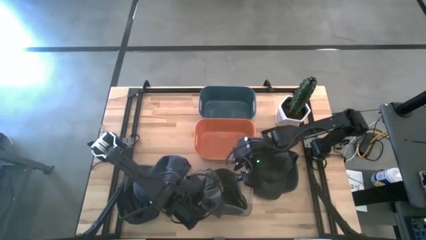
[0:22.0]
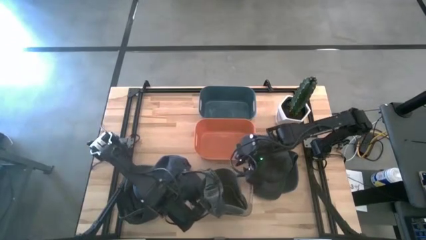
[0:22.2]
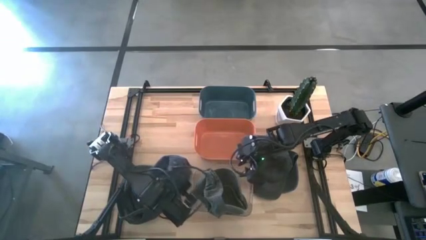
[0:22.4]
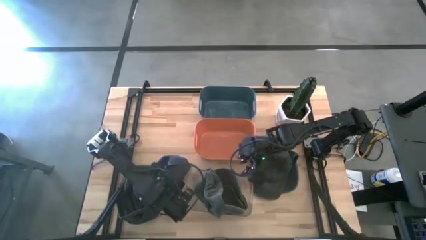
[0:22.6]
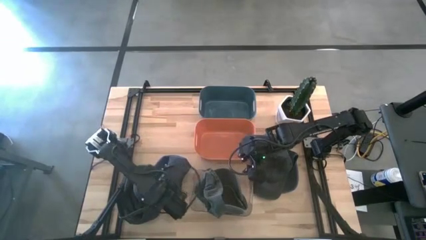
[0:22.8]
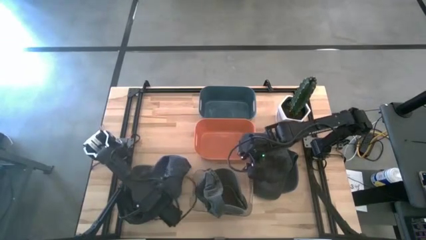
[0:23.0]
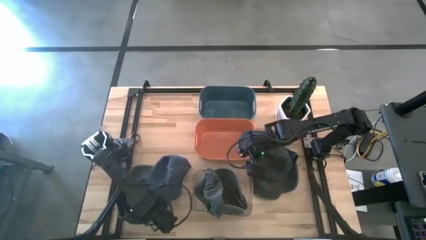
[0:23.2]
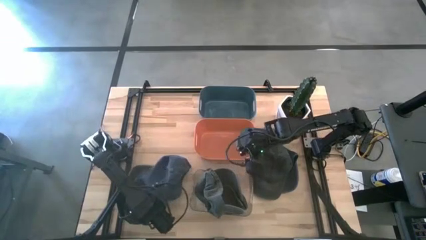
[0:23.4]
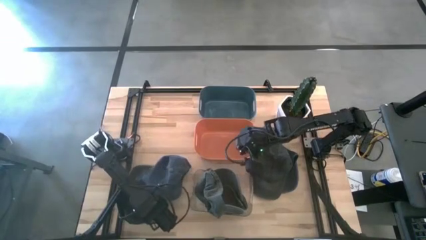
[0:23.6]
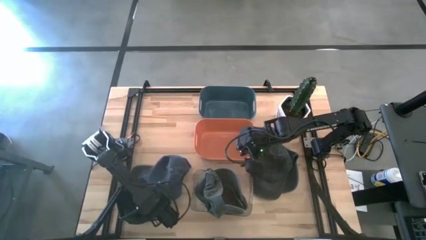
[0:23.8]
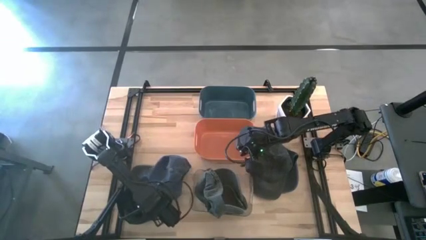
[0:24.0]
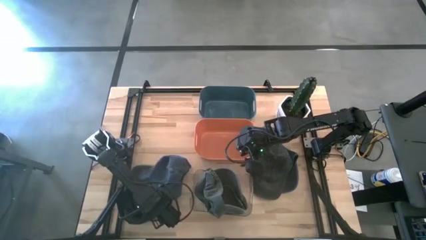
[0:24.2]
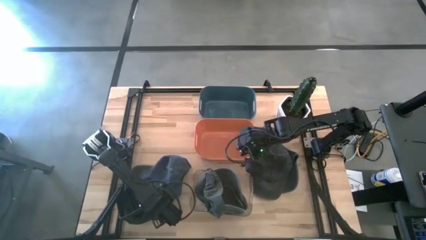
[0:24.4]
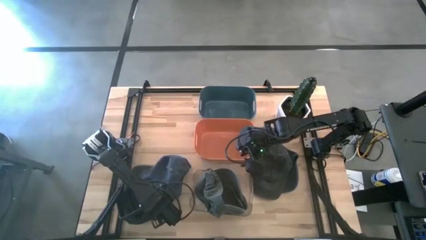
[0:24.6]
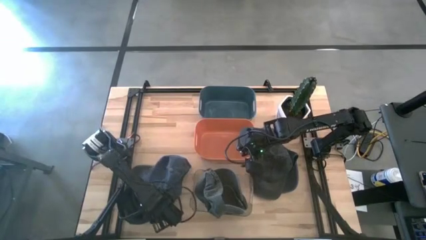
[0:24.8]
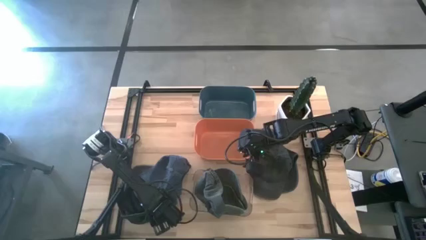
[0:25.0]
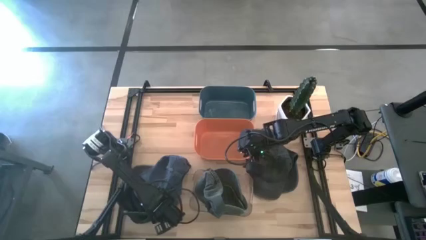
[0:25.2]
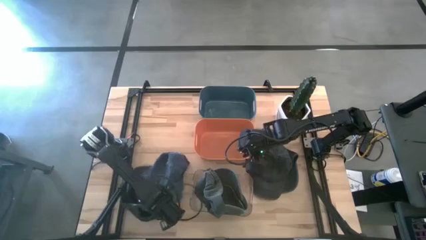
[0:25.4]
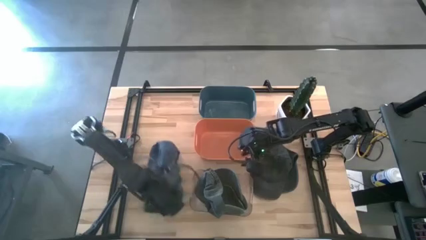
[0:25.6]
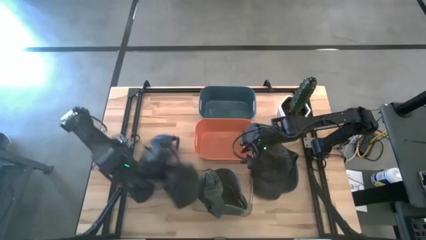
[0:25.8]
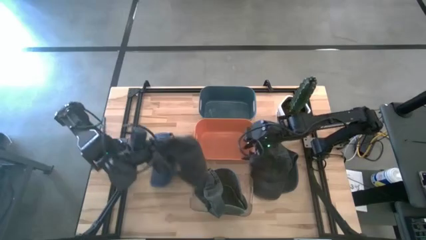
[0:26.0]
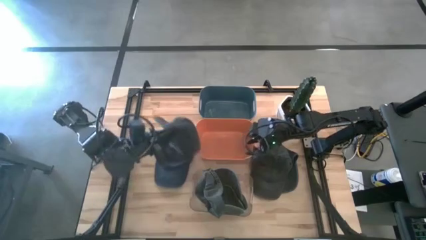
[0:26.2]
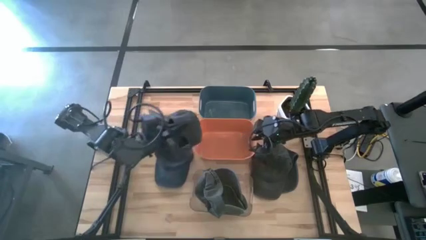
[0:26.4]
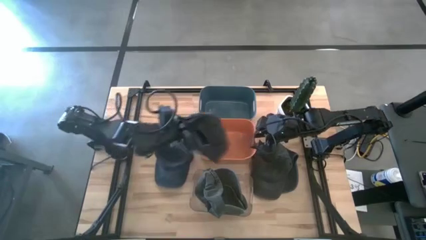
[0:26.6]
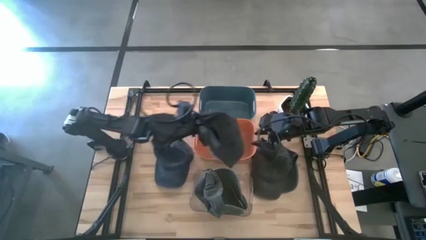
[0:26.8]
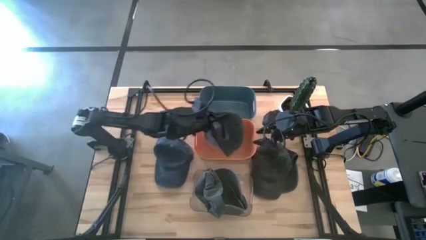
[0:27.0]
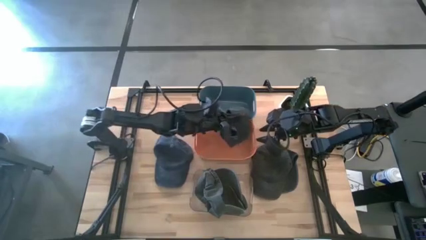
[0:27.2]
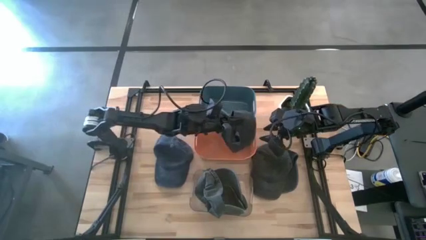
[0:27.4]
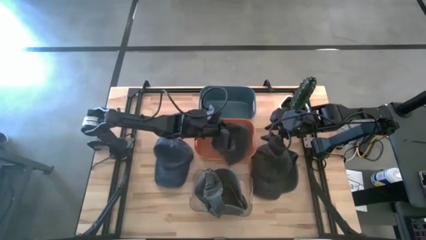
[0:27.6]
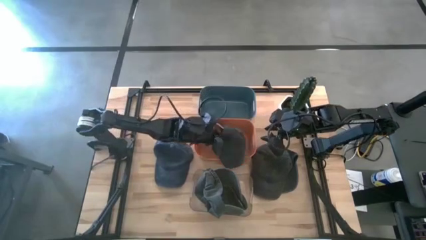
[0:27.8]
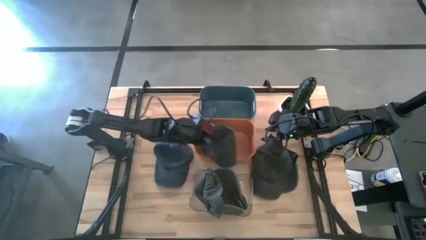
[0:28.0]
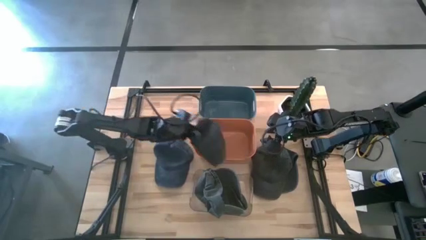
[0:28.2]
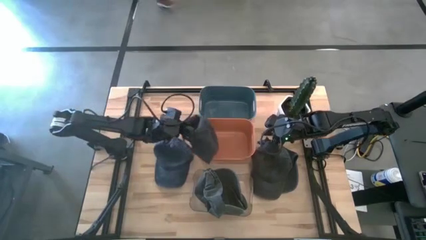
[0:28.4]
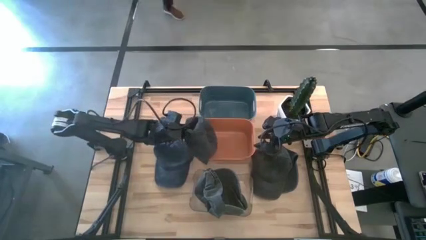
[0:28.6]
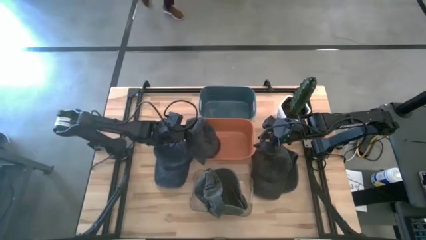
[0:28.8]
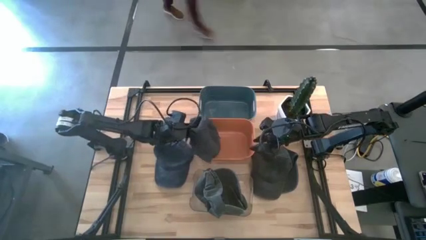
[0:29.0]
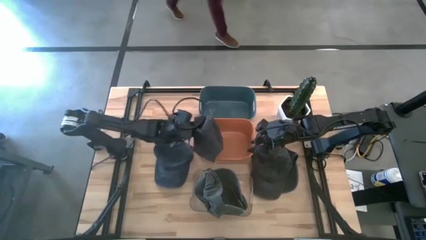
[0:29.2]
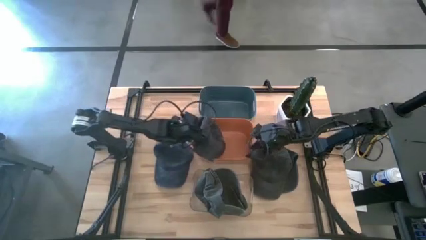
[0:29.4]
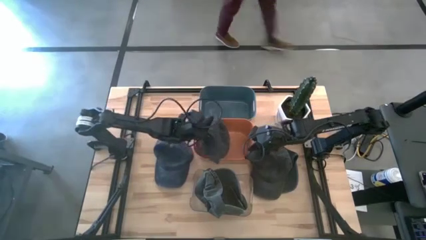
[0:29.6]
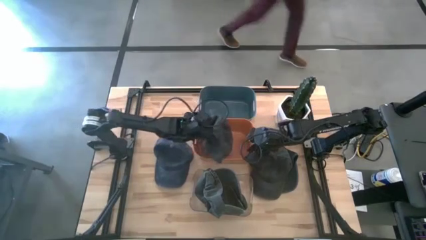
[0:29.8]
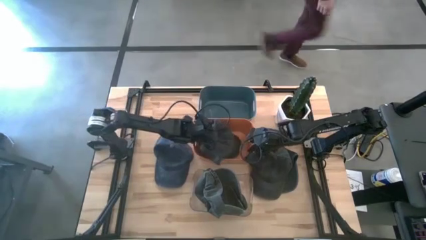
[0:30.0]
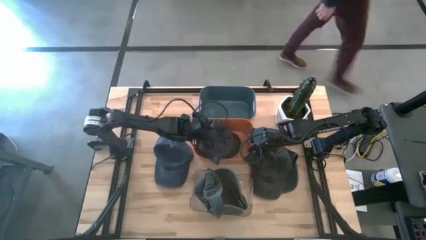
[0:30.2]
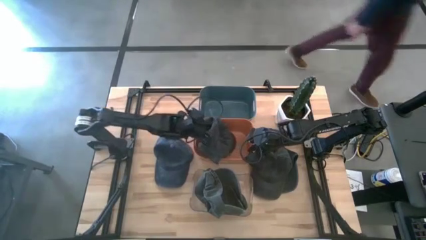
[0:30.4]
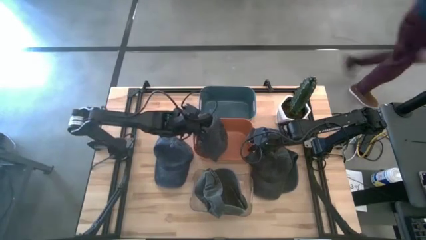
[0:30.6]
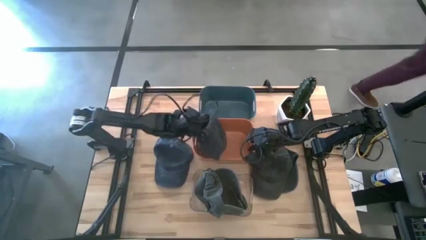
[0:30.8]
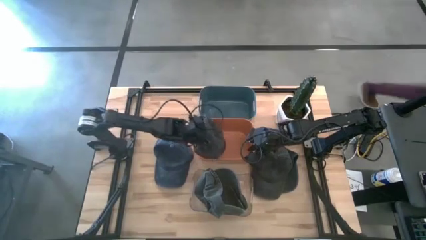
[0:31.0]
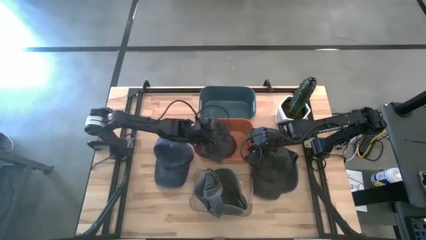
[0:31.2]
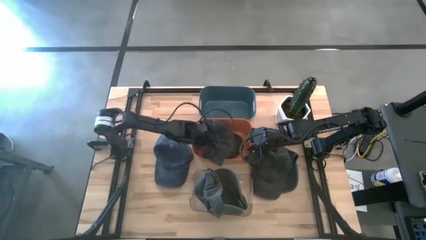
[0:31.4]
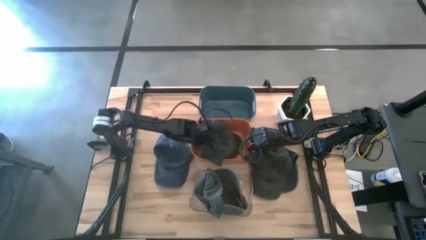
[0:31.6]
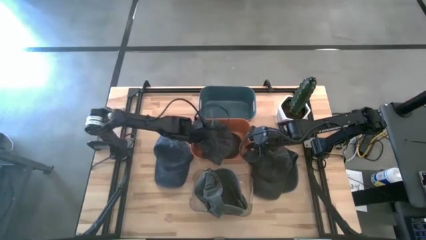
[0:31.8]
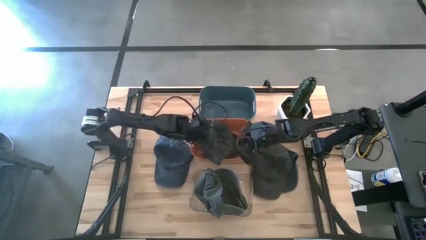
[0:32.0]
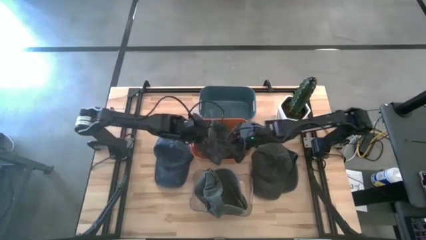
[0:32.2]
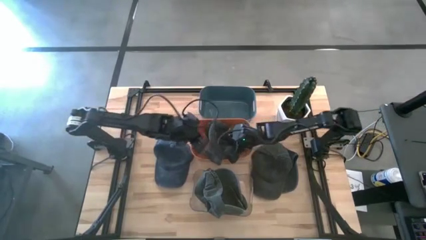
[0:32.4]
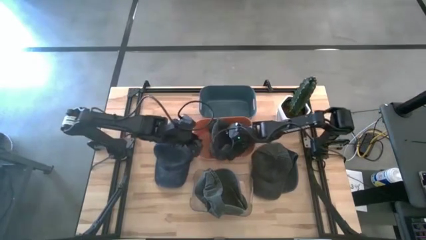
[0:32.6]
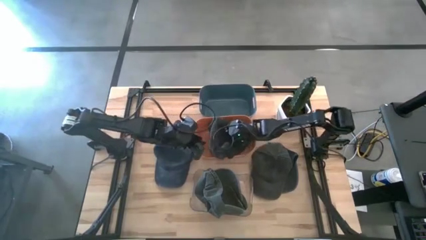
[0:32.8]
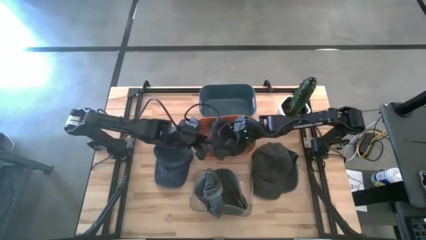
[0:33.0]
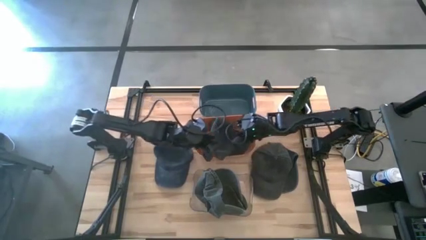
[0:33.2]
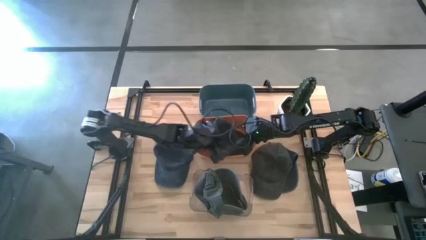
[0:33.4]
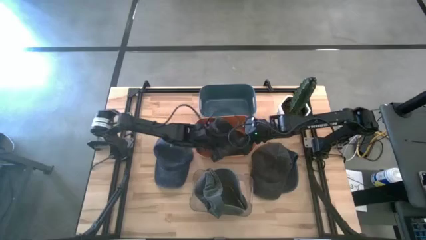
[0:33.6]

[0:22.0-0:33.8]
Task: Pick & Place hat
Put the left black cap into the orange bin

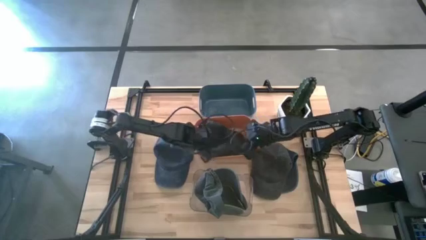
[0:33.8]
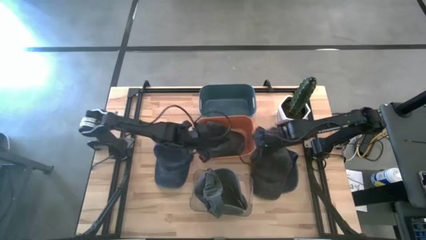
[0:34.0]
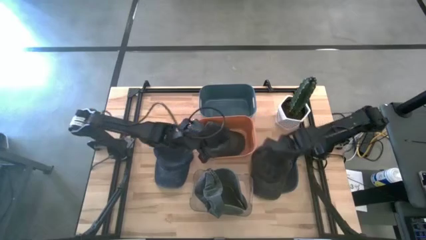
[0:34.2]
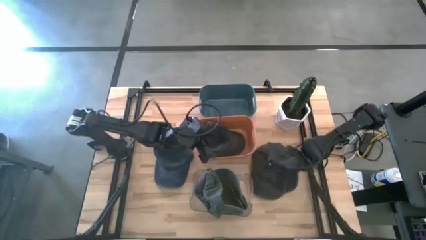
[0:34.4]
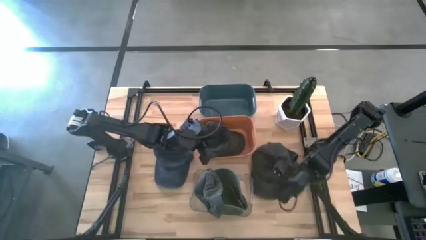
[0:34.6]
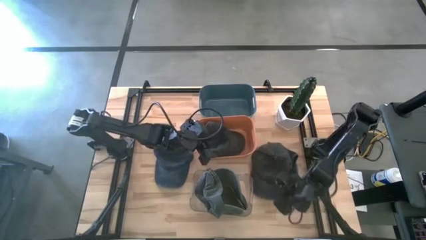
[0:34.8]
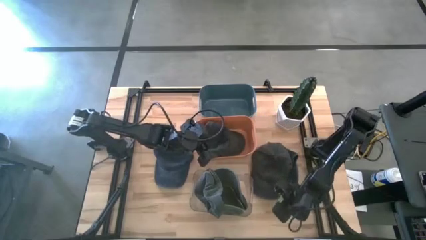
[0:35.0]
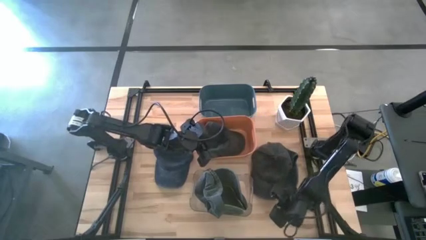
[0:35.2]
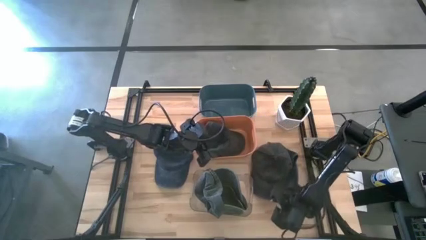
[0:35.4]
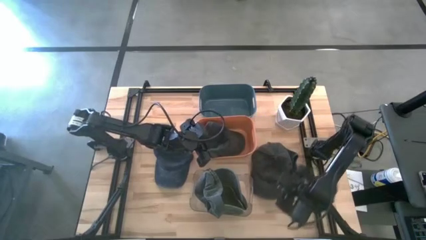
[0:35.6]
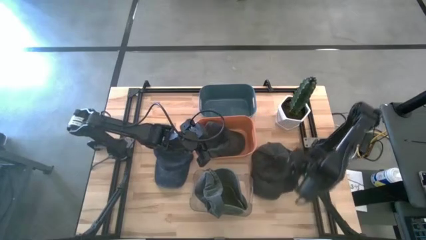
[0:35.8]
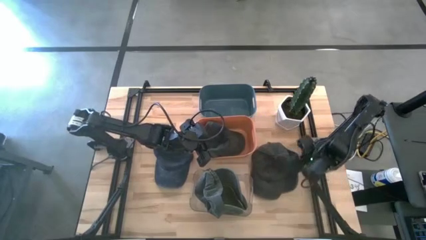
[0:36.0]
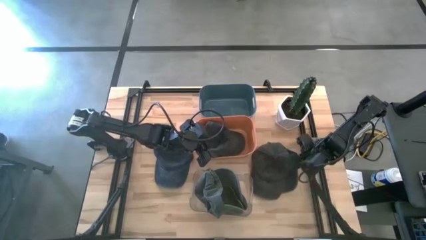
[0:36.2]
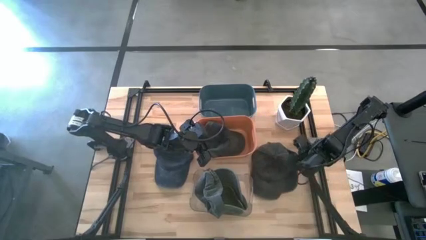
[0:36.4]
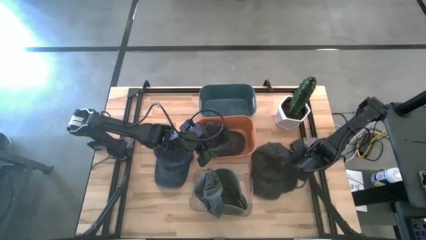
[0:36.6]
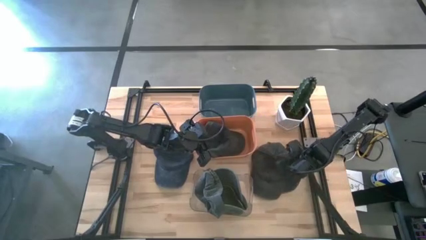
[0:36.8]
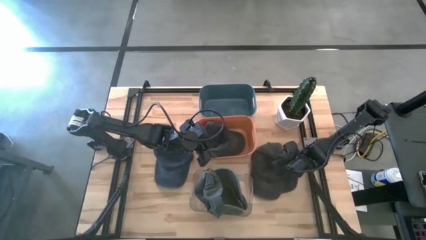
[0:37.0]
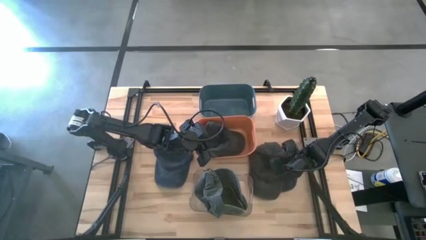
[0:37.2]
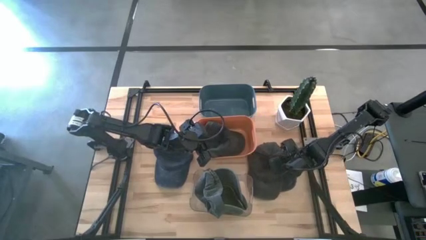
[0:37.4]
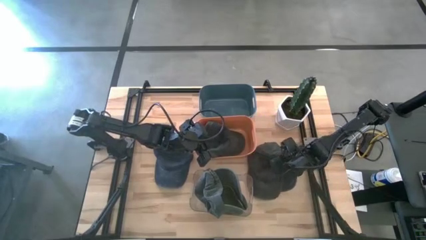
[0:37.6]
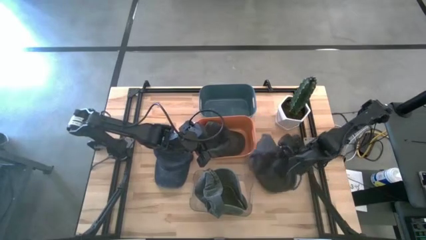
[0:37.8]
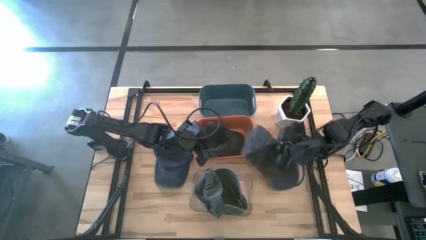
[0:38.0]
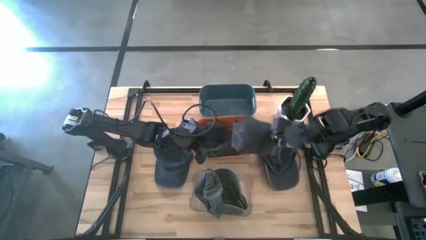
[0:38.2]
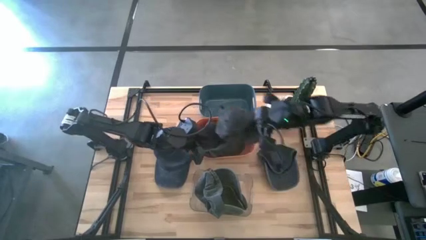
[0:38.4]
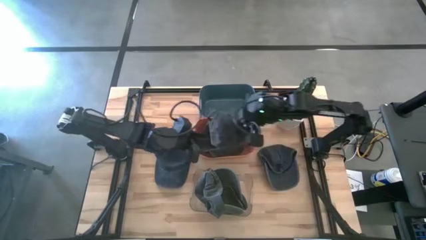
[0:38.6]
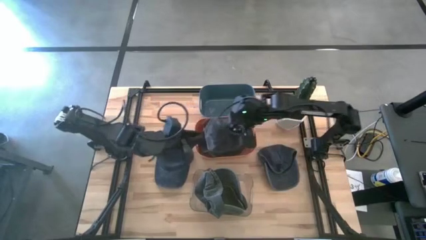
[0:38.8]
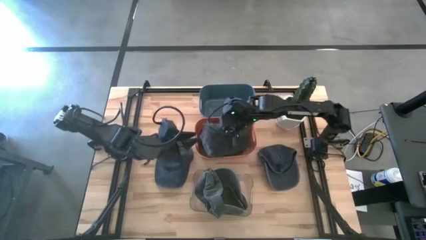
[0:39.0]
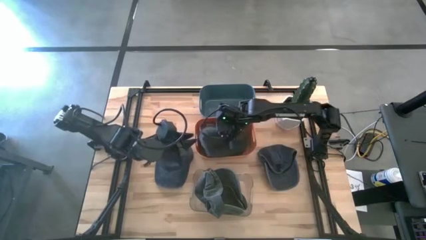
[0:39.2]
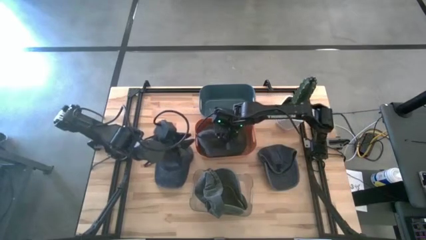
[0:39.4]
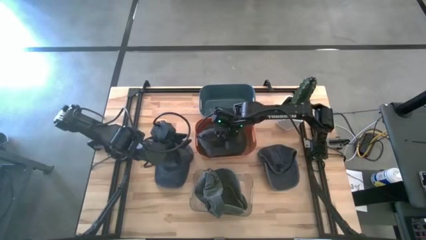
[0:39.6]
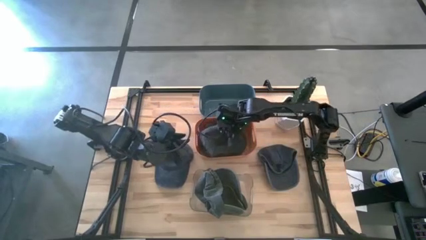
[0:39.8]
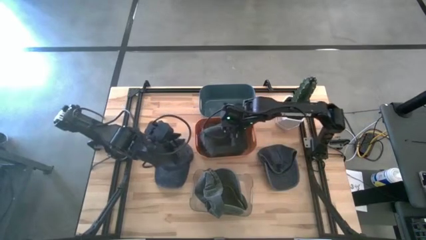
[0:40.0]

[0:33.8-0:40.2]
Put the black cap into the orange bin
